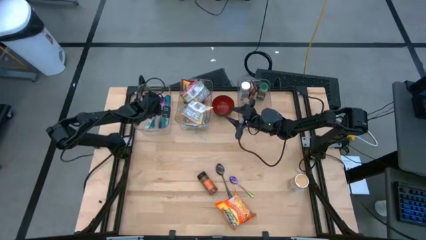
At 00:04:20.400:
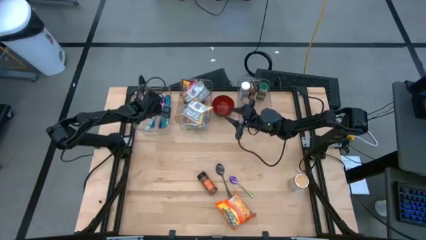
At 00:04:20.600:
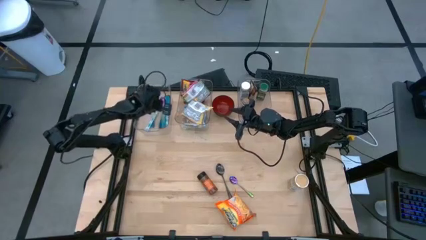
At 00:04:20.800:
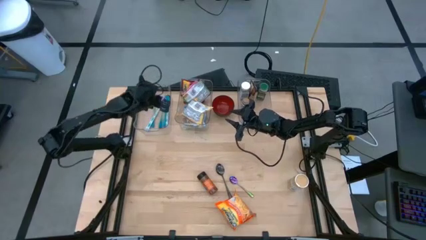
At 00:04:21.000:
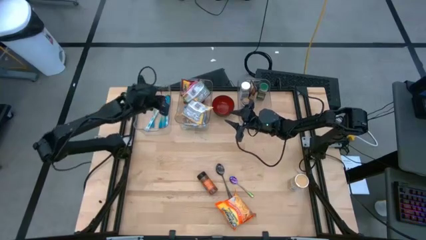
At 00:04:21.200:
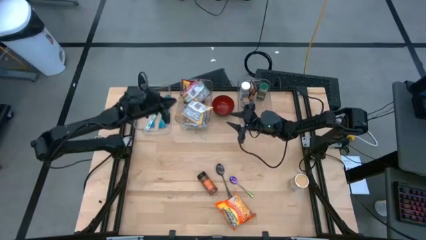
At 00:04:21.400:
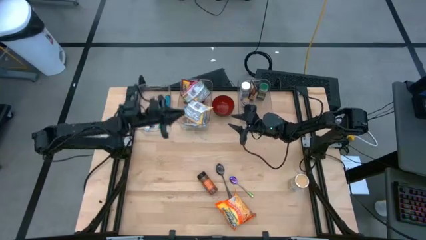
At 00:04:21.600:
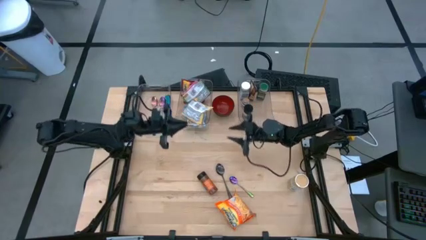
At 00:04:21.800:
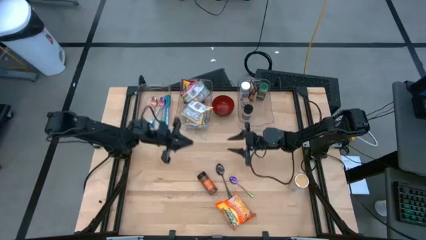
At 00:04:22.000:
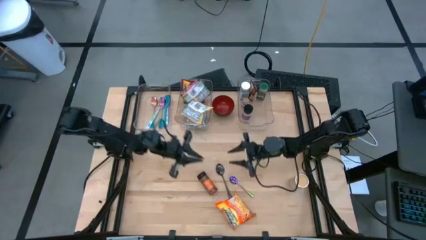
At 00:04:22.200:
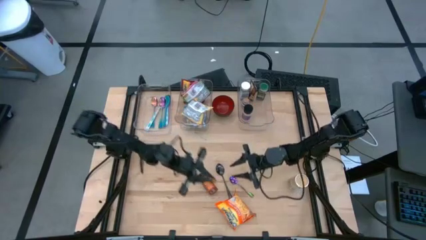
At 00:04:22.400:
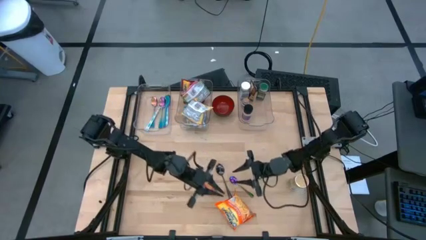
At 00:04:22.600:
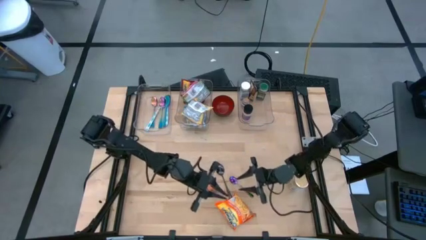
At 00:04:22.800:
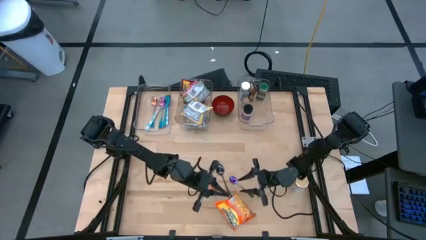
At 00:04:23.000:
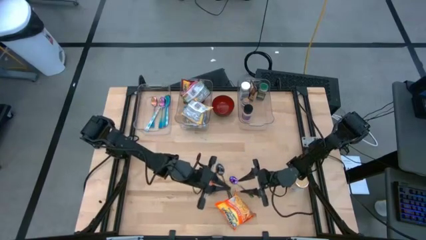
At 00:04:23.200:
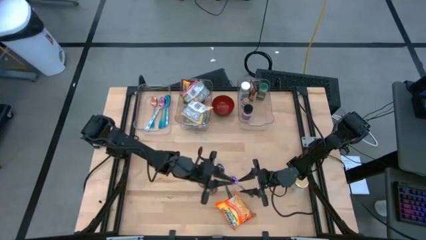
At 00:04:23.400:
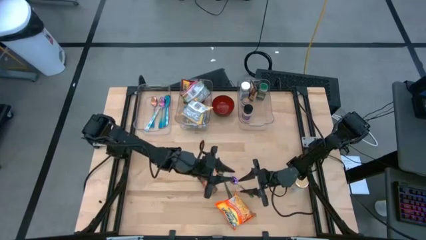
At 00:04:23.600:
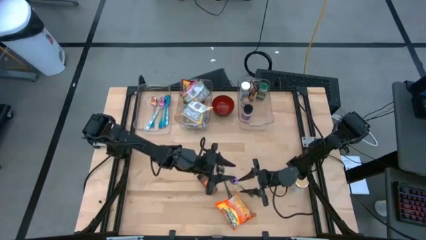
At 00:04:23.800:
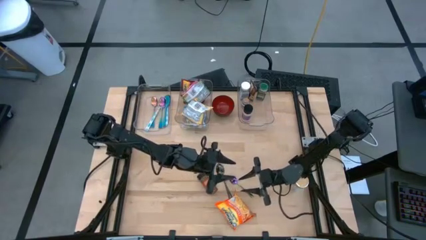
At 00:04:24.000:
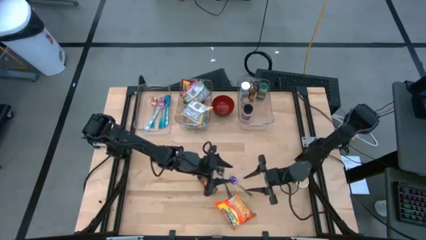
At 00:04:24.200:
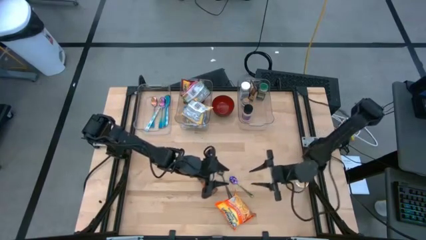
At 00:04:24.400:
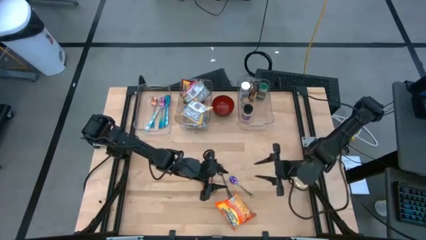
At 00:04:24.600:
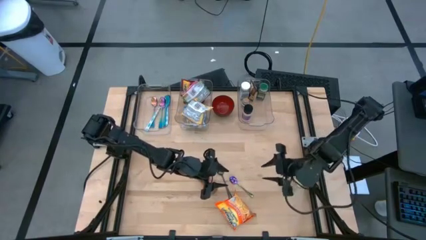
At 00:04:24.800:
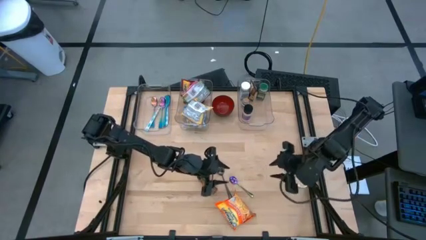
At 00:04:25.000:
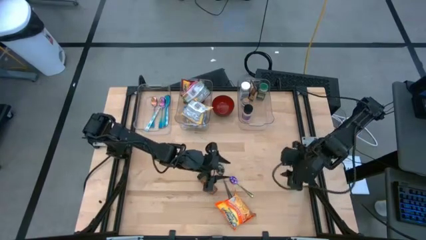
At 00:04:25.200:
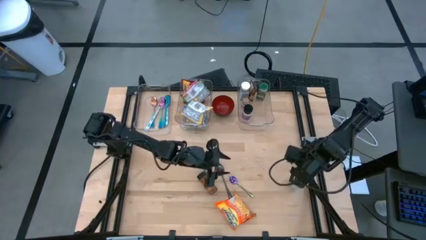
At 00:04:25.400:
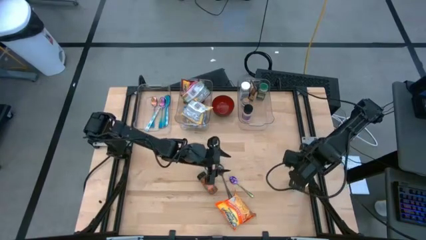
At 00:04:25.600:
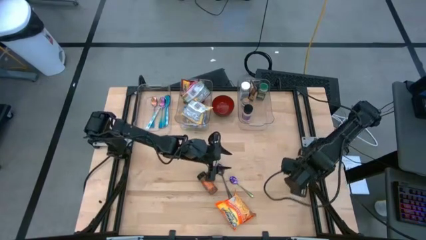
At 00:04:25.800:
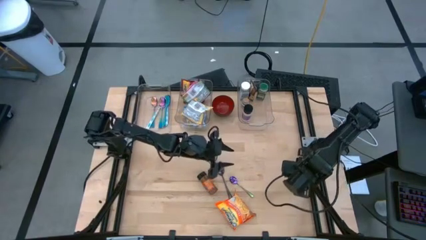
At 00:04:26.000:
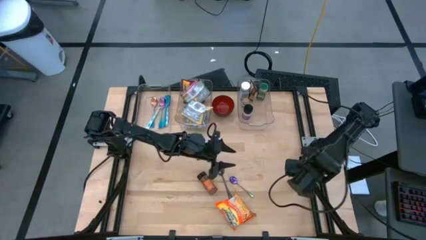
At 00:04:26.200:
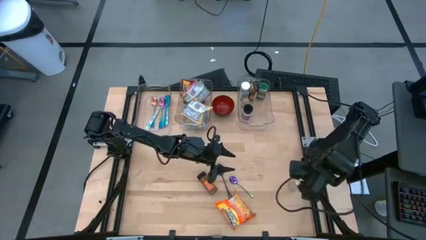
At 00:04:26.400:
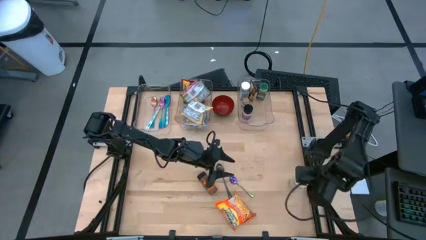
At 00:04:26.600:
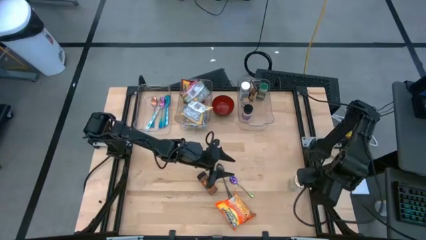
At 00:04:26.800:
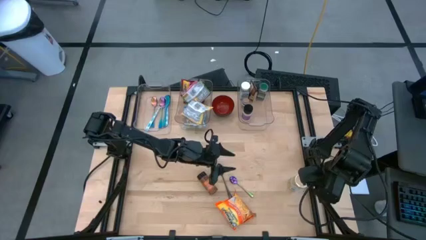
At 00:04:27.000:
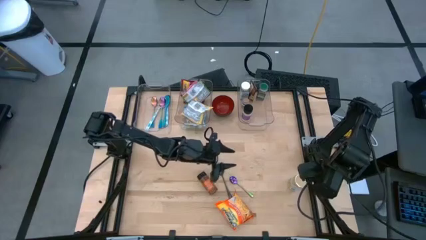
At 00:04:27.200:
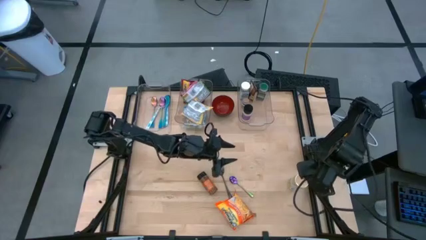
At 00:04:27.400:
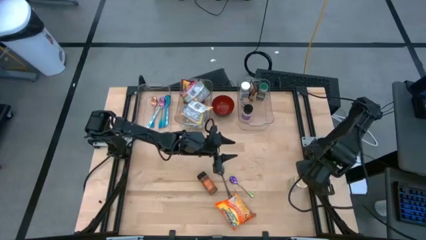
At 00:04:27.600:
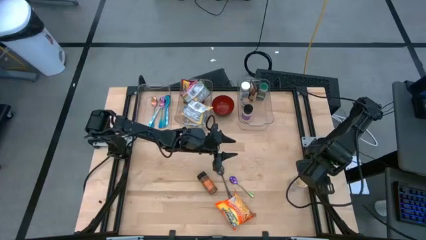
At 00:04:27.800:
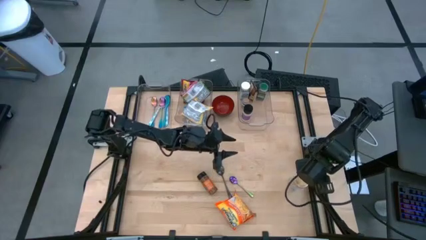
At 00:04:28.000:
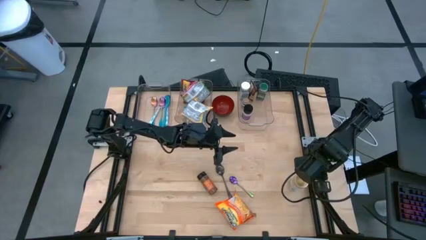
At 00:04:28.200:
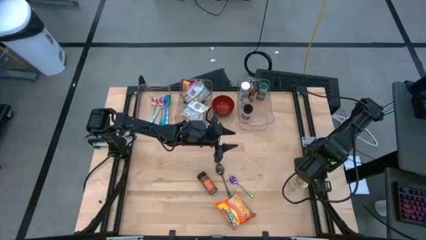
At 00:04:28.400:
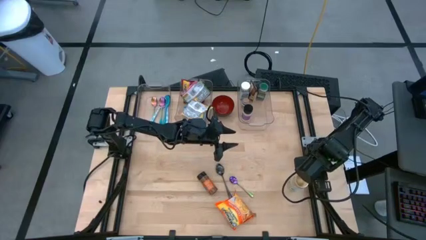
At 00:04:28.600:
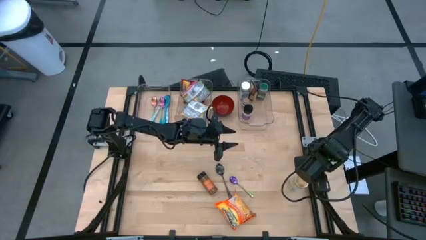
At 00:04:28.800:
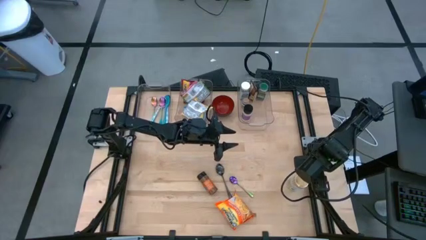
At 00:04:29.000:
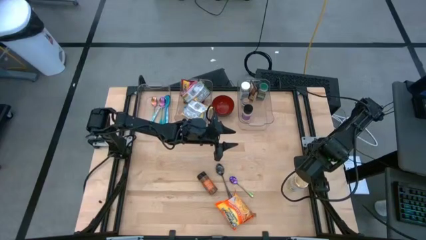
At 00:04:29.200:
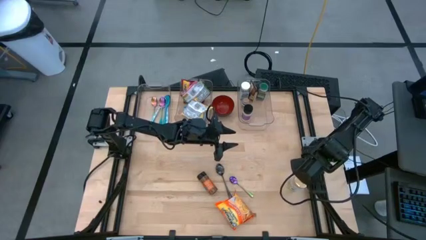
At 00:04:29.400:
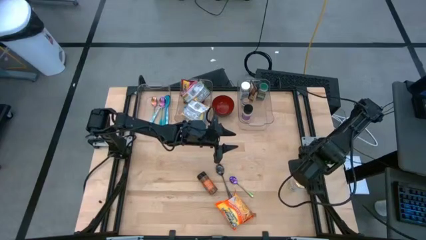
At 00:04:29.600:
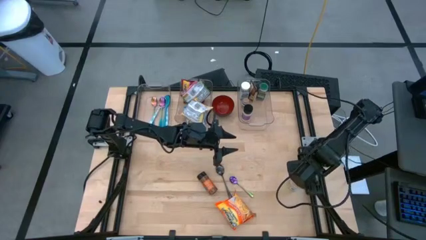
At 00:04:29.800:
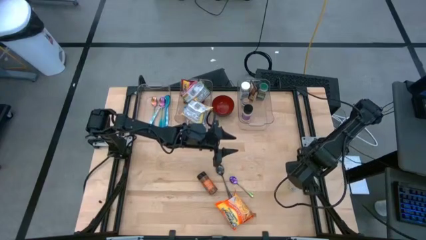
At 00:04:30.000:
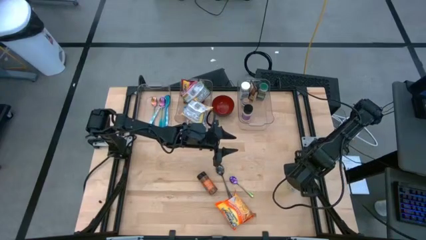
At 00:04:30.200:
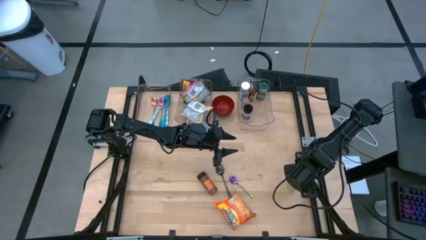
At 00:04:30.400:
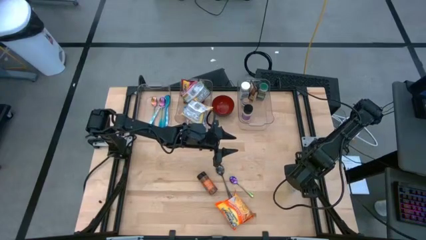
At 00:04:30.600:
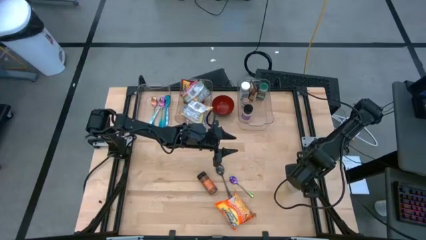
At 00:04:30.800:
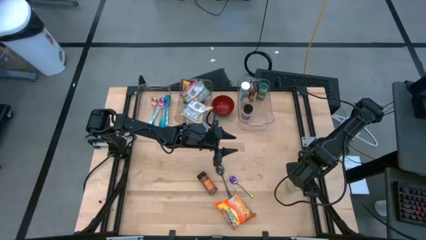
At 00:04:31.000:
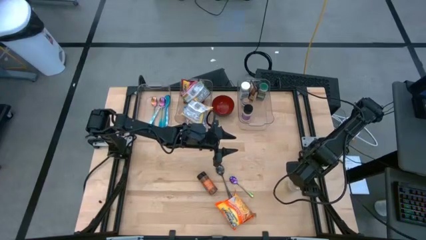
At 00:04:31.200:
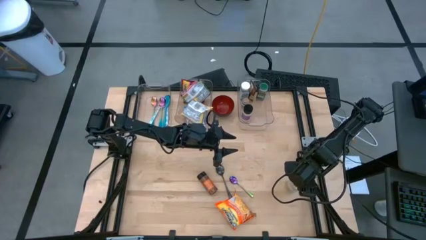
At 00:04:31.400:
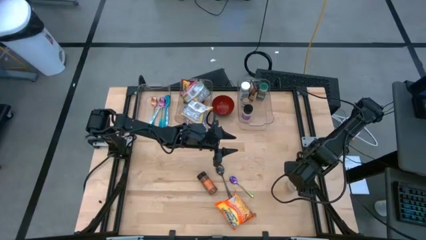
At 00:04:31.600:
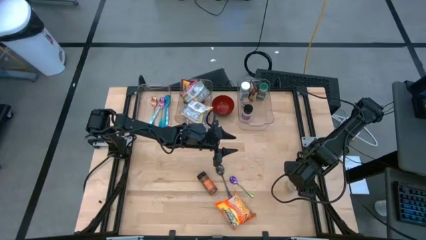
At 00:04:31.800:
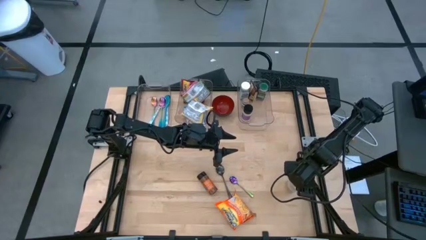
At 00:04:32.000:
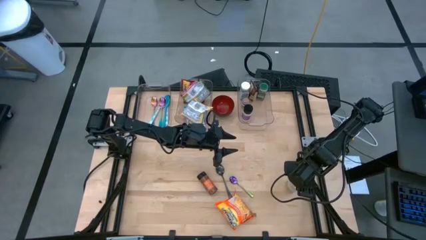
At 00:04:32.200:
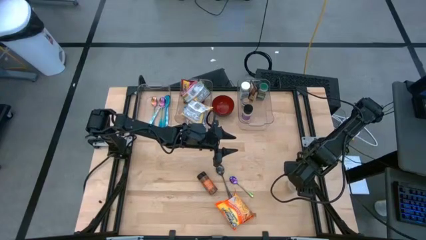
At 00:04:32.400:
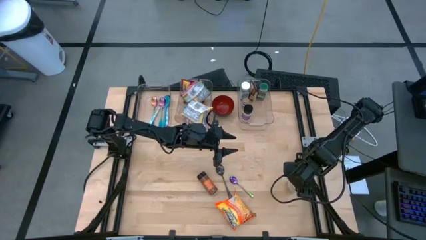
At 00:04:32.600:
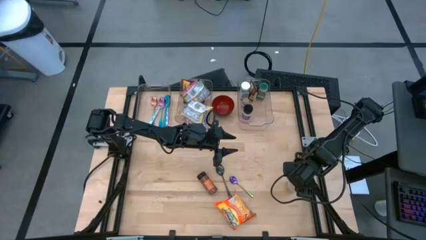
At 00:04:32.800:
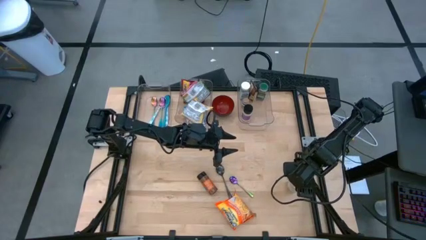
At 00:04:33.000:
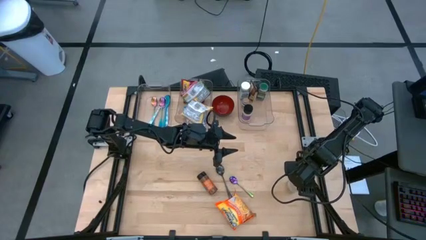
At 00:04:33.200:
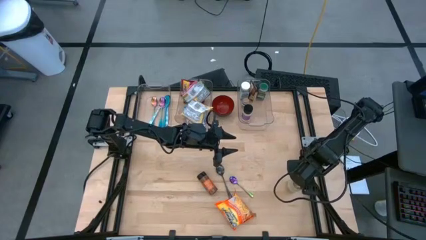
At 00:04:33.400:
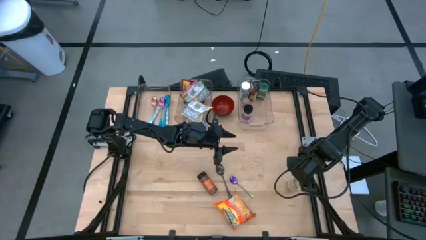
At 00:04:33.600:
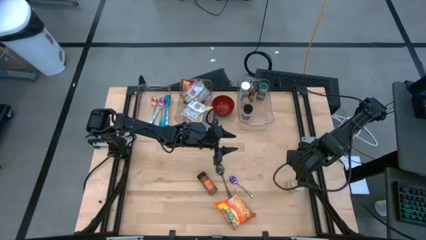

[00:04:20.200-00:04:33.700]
Task: Pick & Place Food Item
Put the gold seasoning bottle into the right transparent bin
